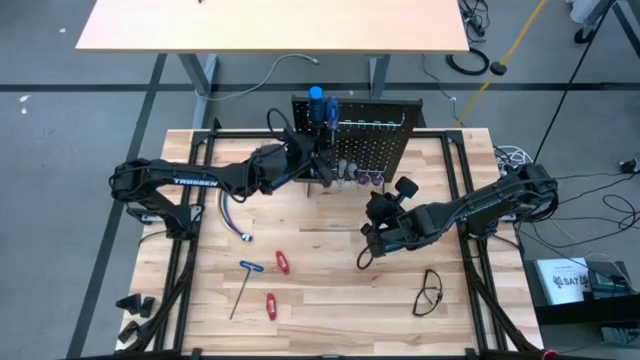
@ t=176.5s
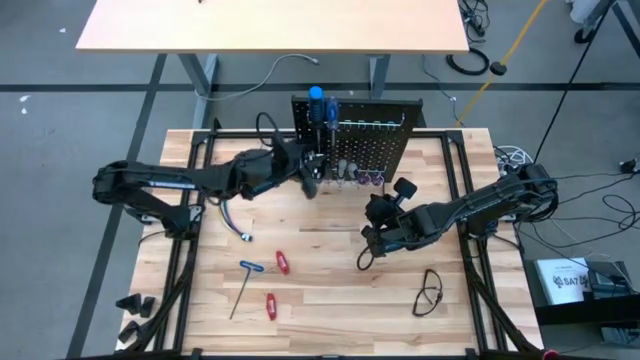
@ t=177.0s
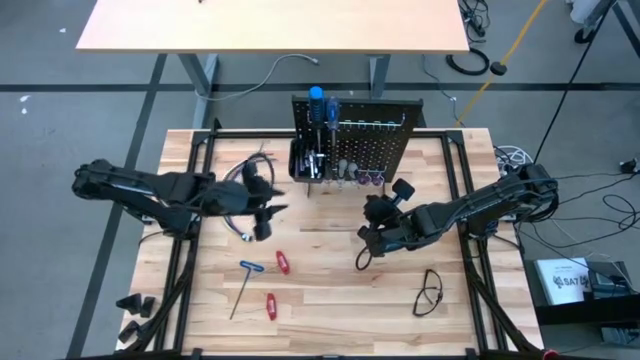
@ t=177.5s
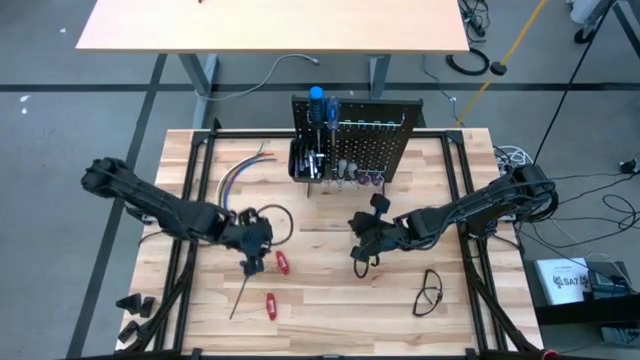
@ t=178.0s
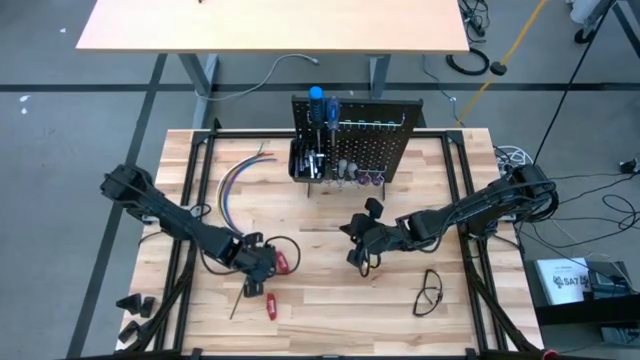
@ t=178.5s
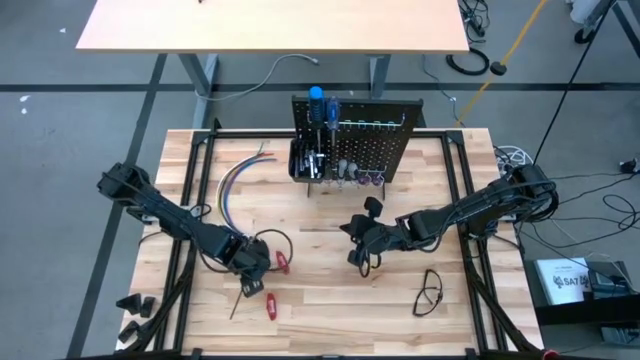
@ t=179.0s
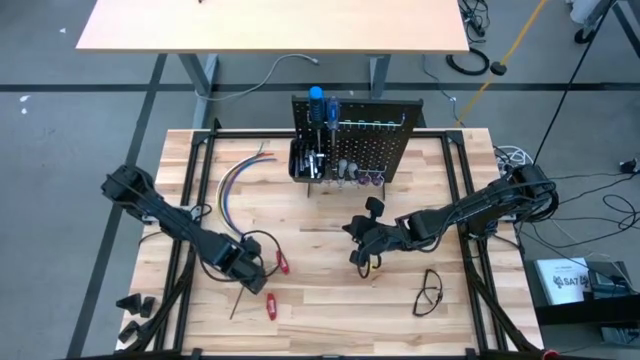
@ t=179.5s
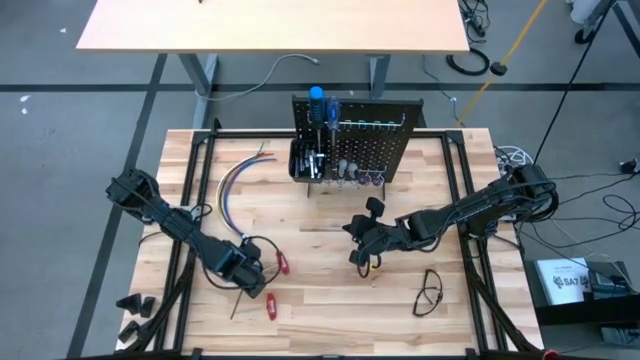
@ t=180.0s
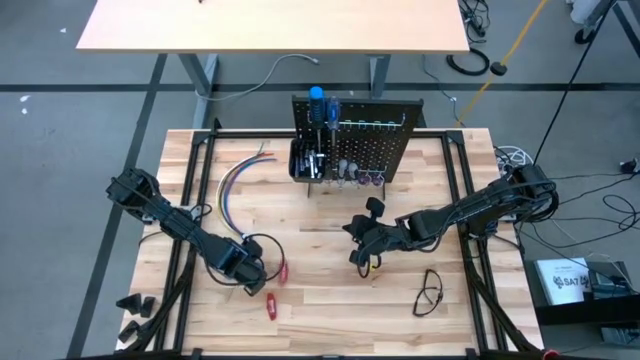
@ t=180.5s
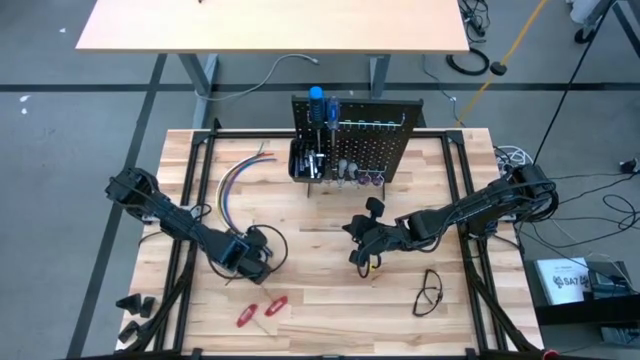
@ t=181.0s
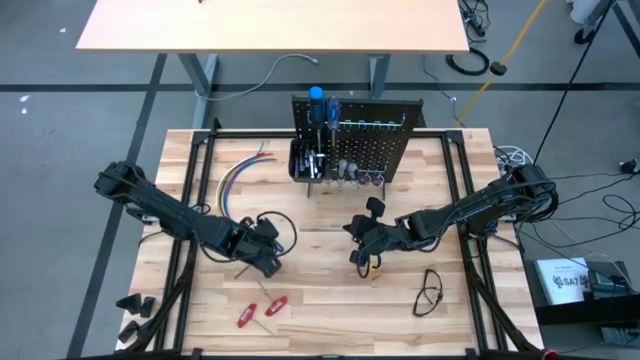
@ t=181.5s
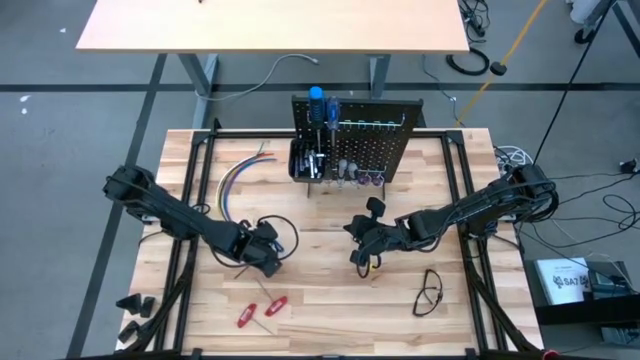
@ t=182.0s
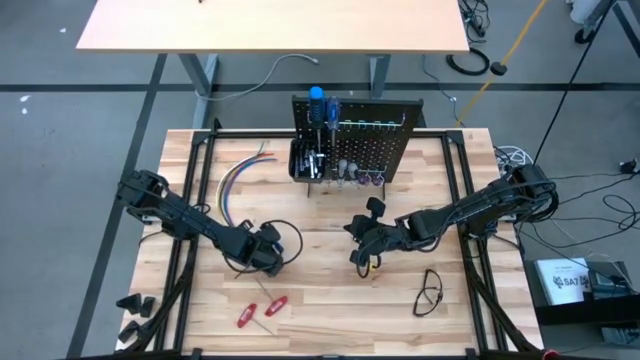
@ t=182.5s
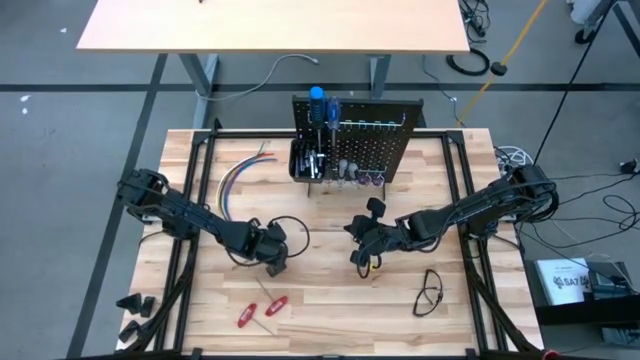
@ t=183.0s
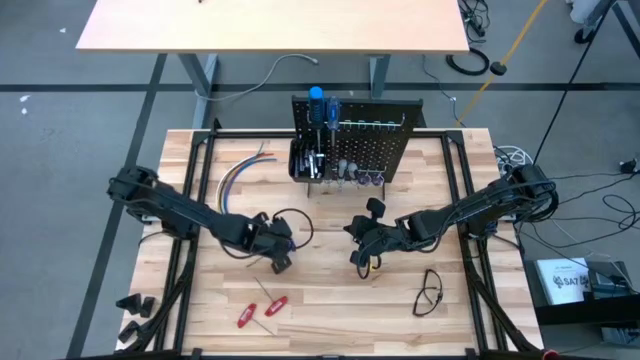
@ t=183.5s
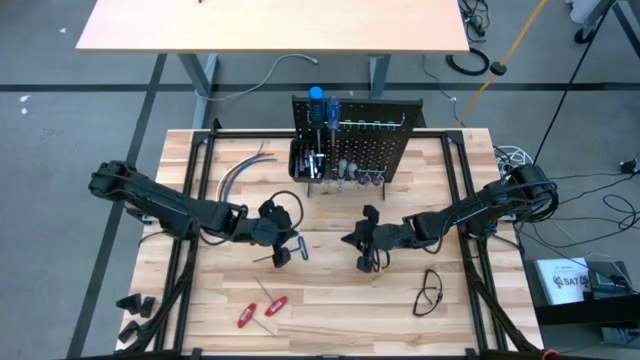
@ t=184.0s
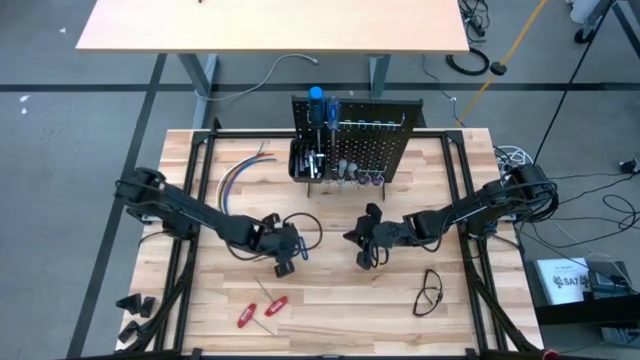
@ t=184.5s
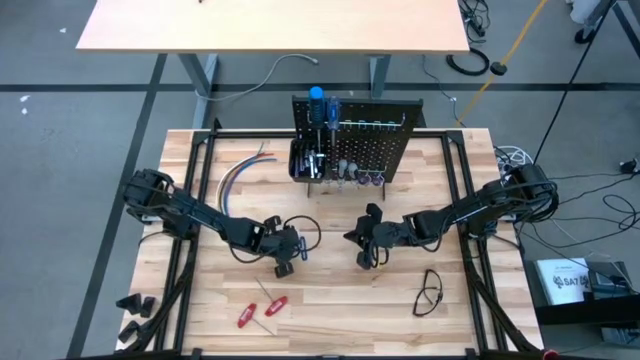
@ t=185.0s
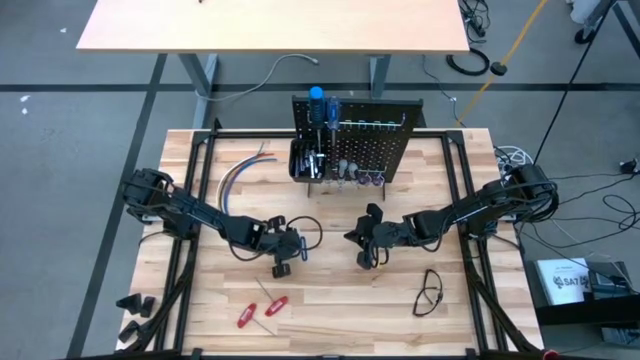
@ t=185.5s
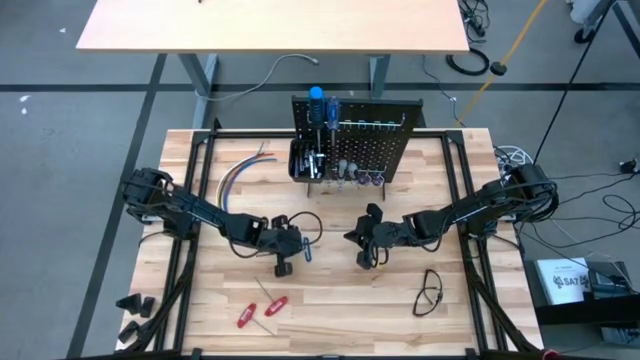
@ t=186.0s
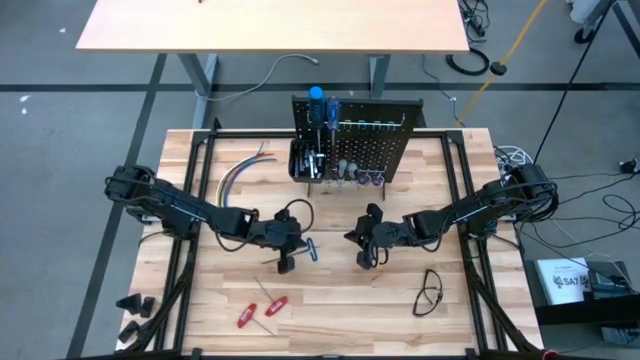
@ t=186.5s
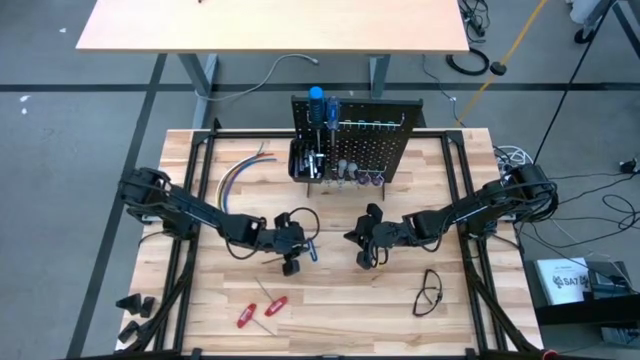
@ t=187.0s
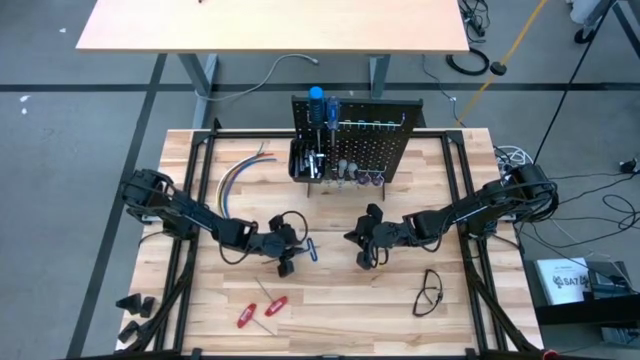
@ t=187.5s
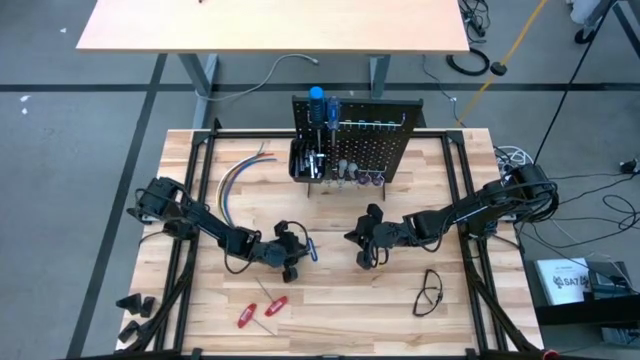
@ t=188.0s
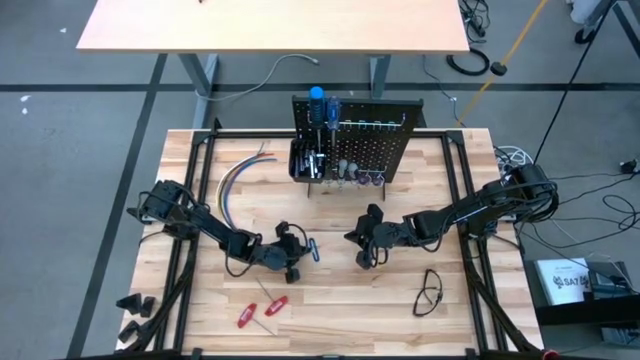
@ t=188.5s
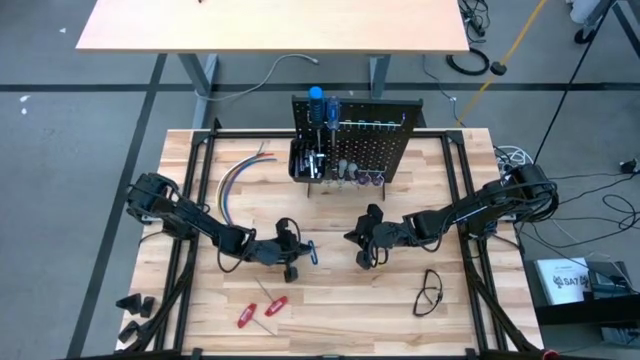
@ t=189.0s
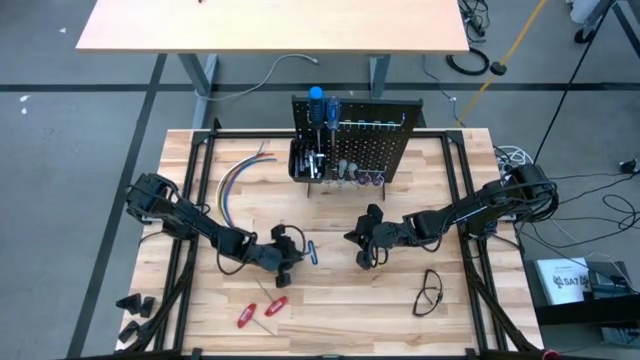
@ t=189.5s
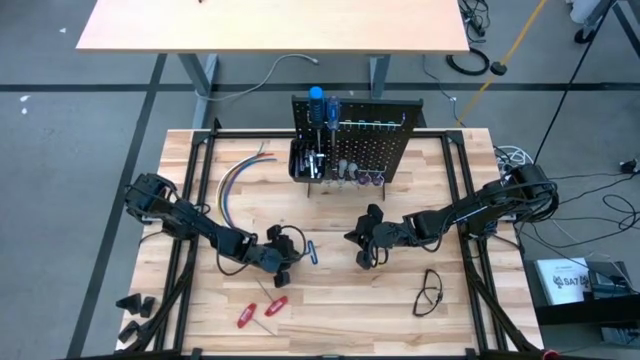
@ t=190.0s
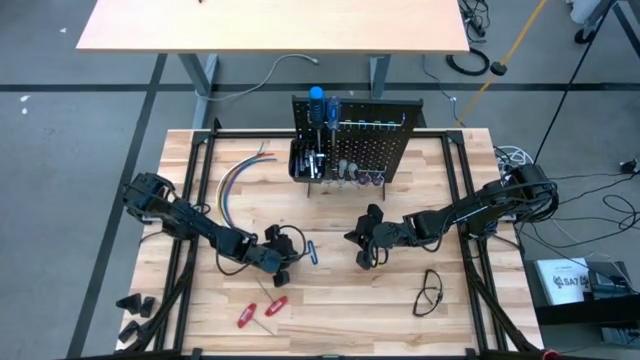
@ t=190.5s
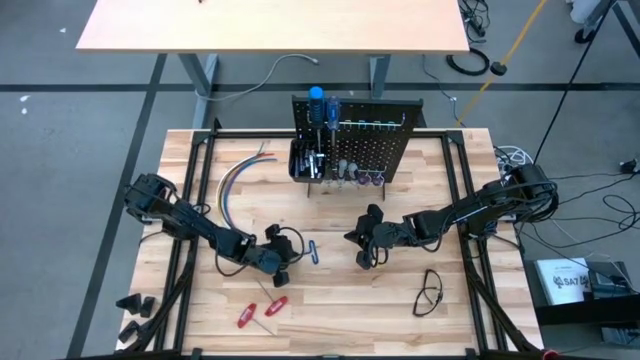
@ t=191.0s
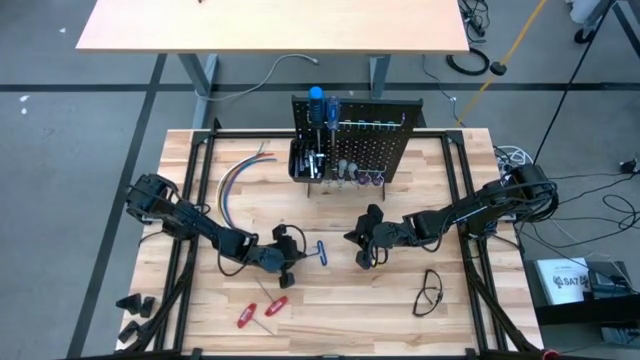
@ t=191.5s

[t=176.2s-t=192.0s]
Task: Hang tools onto peg board
Hang the blue pick tool on the peg board

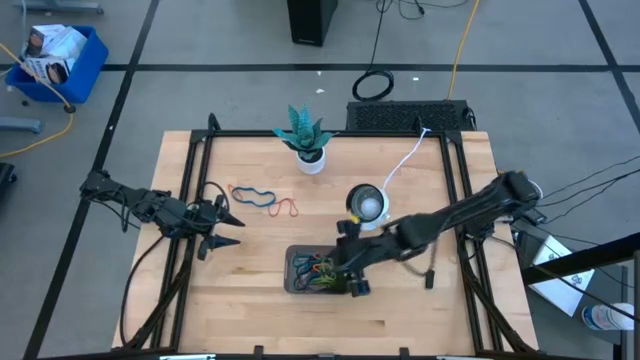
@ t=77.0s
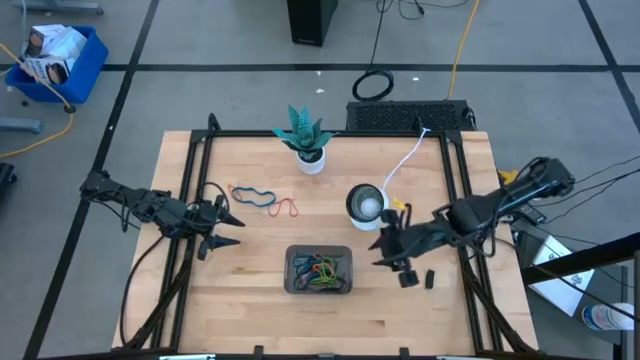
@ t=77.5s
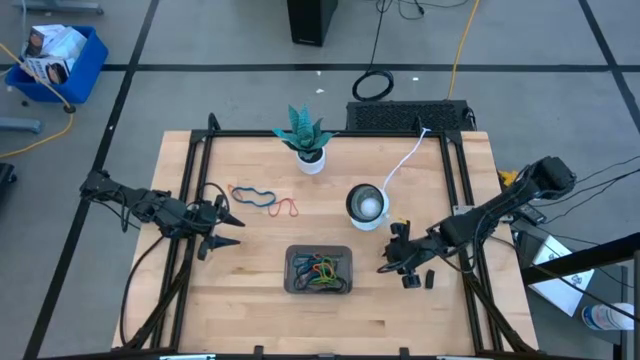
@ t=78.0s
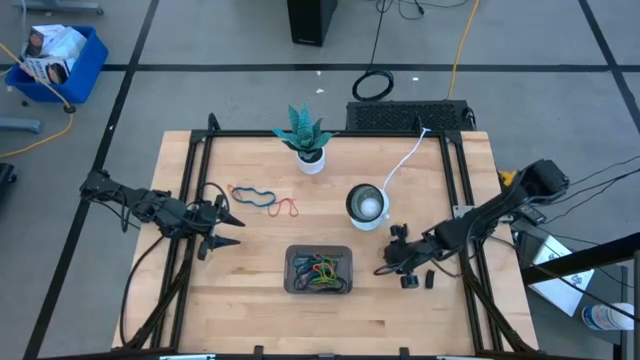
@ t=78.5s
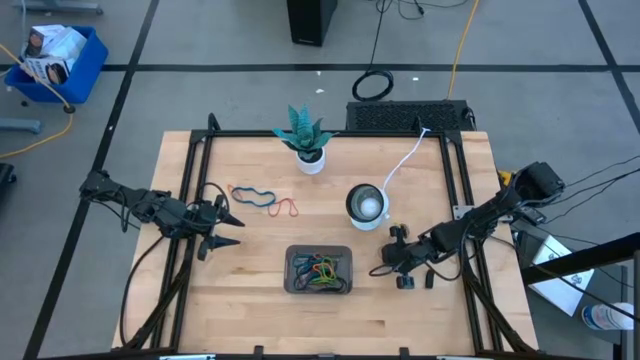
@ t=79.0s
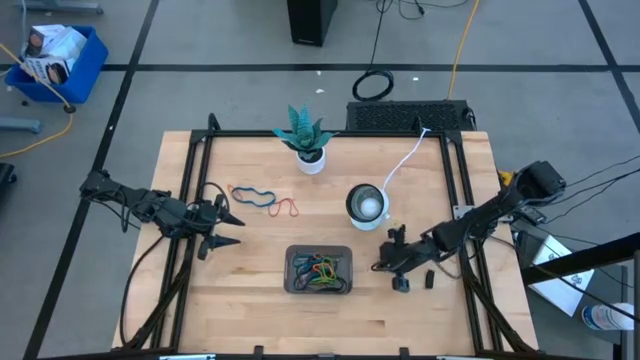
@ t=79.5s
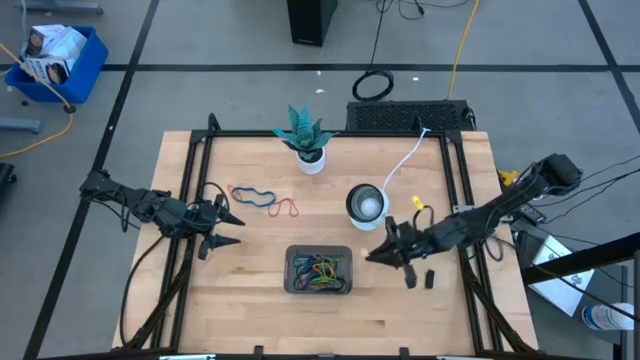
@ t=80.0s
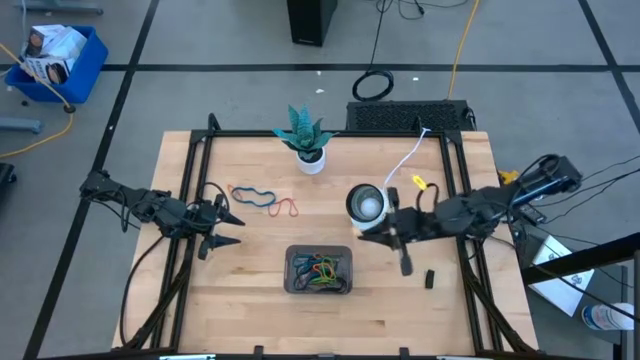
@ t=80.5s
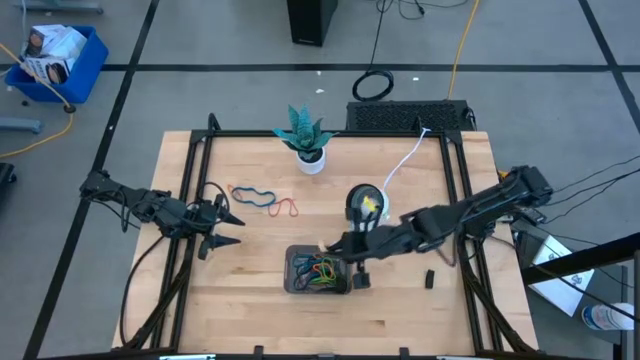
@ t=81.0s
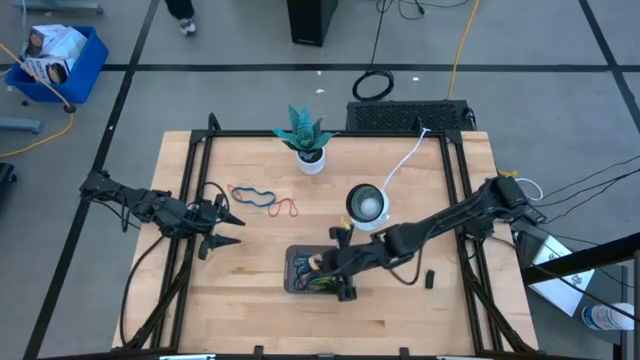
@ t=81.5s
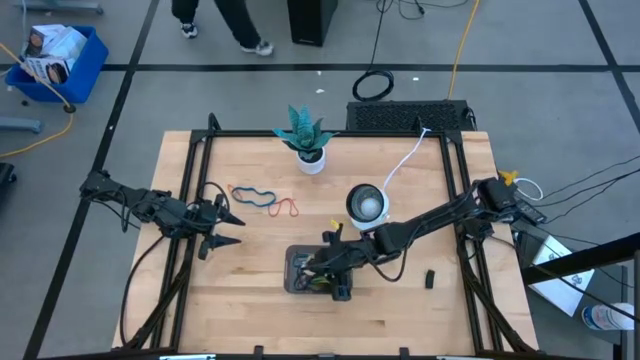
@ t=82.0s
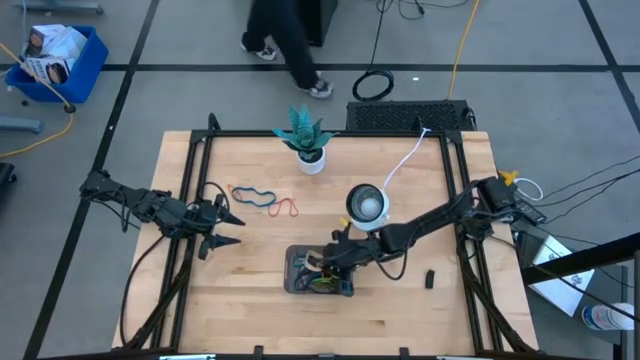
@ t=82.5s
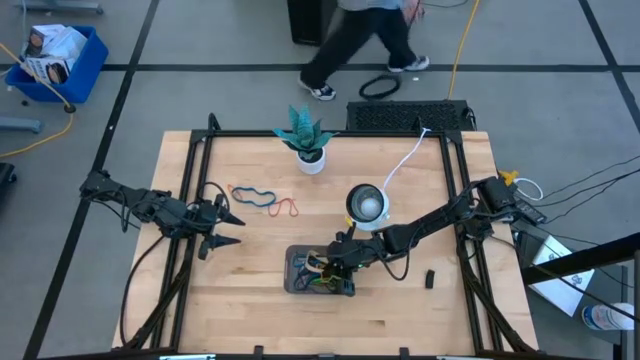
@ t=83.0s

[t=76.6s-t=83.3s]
Task: Pick and place rubber bands into bin
Put the white rubber band into the gray bin
